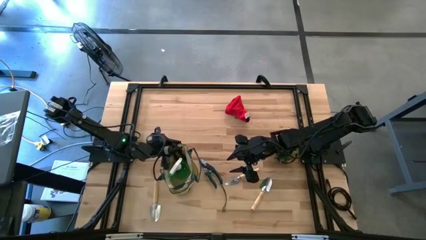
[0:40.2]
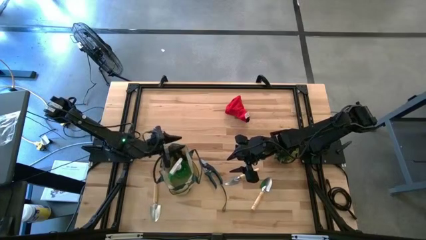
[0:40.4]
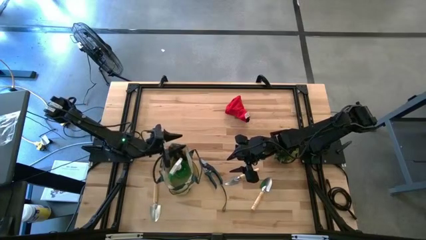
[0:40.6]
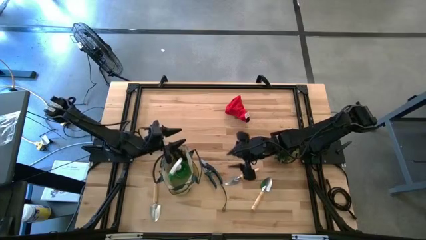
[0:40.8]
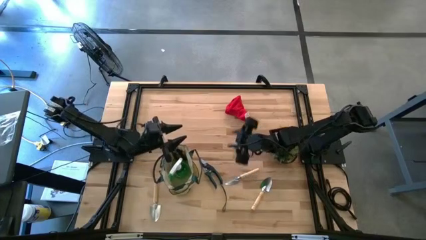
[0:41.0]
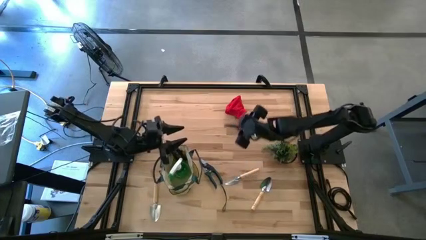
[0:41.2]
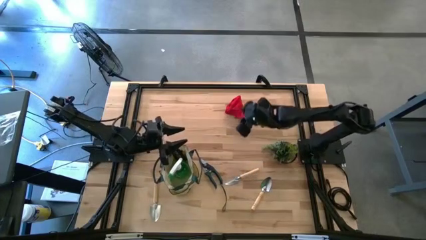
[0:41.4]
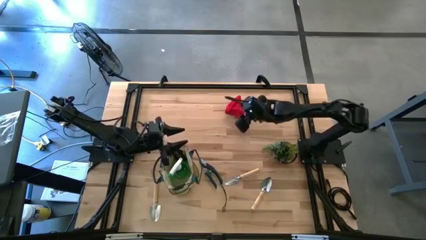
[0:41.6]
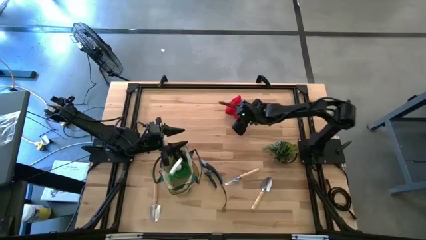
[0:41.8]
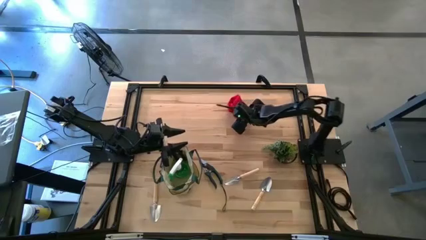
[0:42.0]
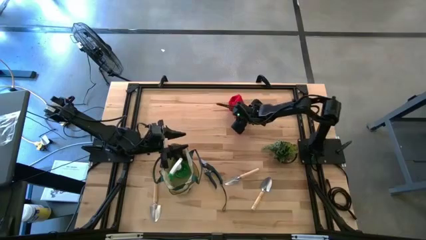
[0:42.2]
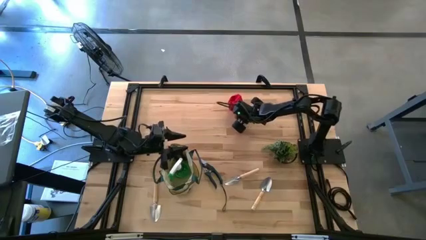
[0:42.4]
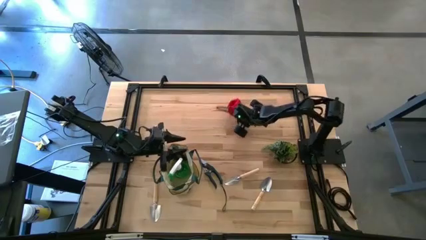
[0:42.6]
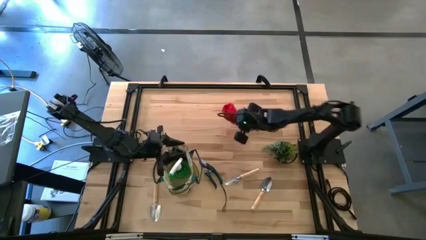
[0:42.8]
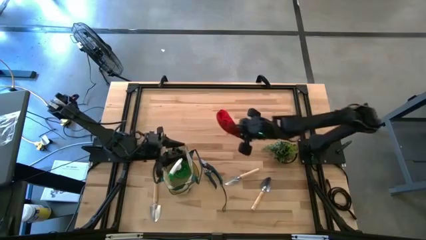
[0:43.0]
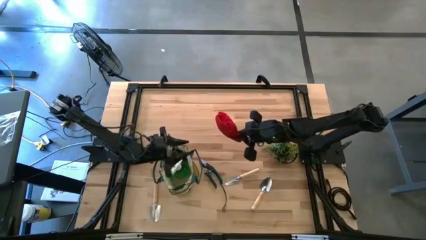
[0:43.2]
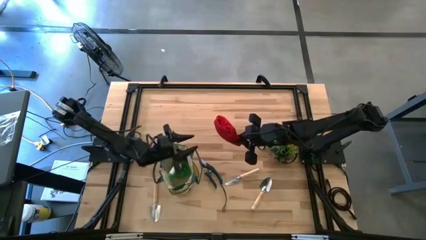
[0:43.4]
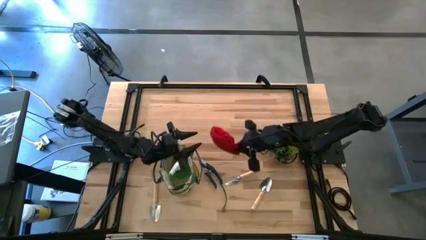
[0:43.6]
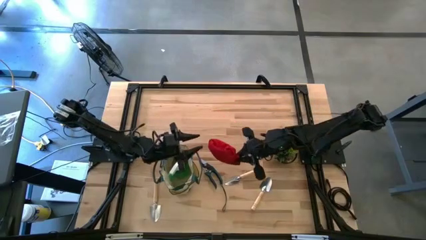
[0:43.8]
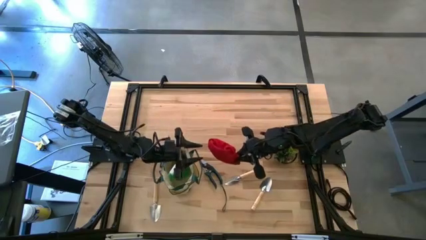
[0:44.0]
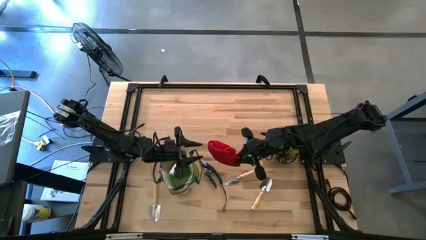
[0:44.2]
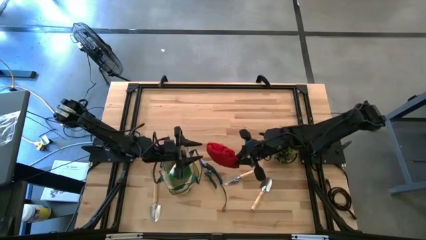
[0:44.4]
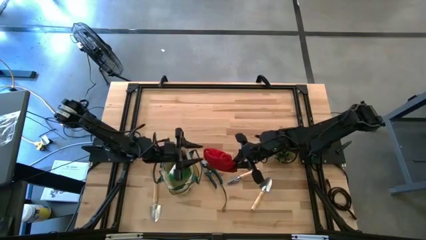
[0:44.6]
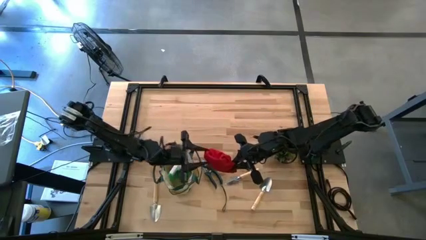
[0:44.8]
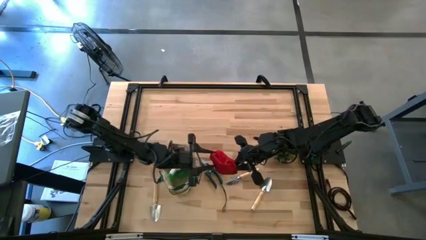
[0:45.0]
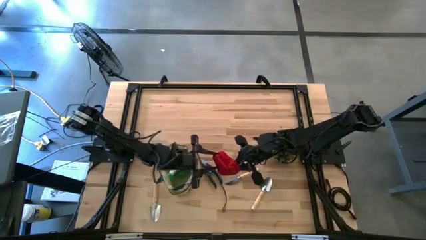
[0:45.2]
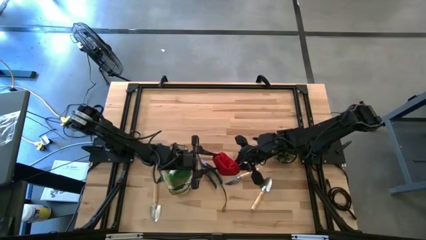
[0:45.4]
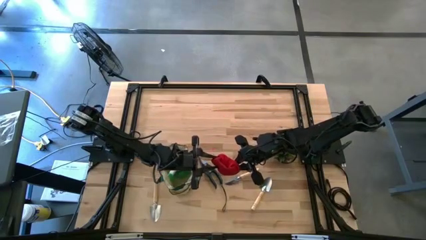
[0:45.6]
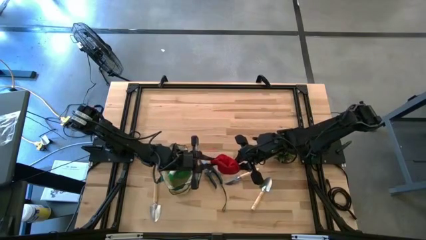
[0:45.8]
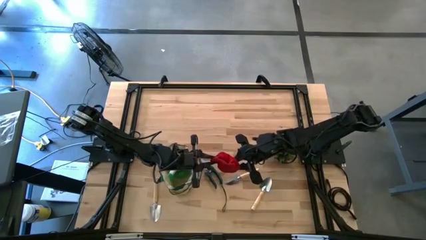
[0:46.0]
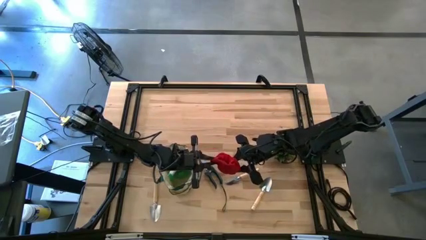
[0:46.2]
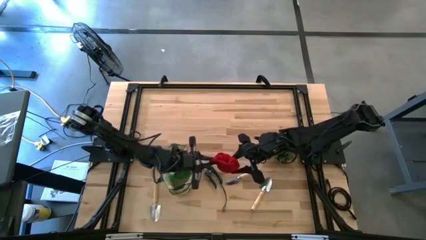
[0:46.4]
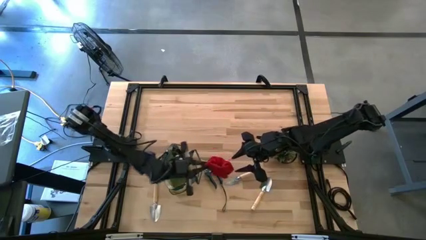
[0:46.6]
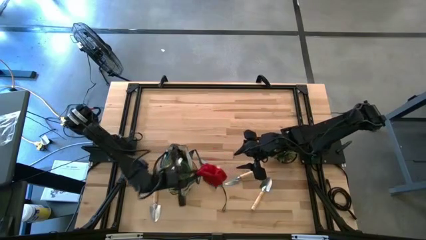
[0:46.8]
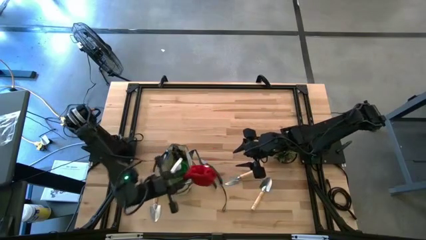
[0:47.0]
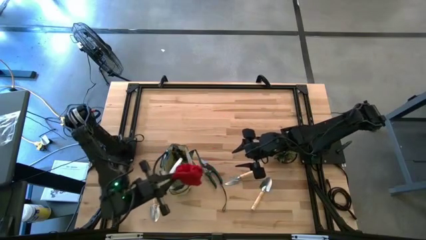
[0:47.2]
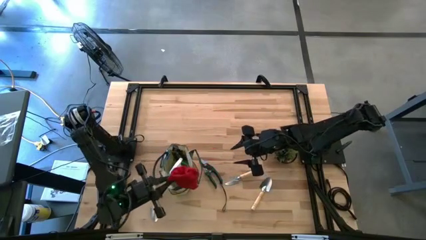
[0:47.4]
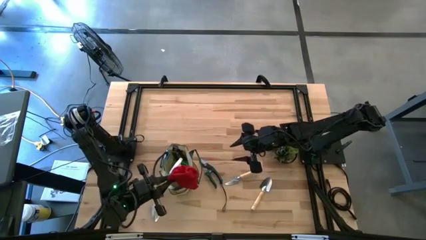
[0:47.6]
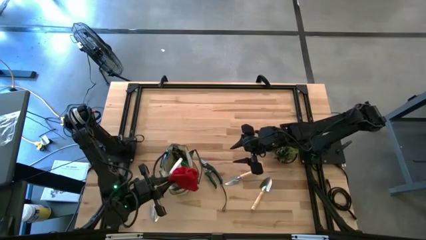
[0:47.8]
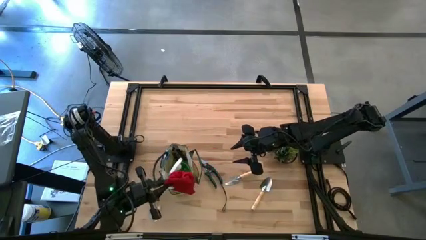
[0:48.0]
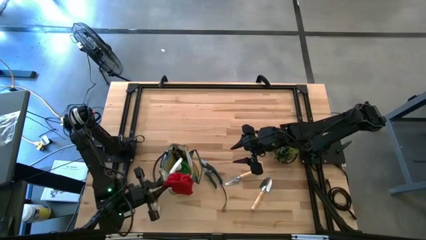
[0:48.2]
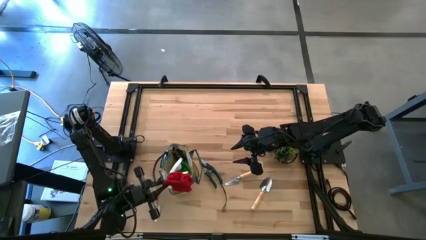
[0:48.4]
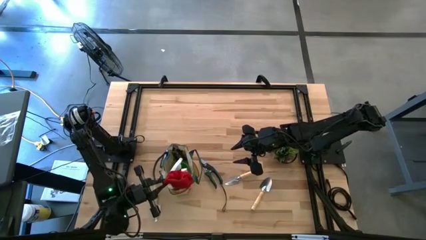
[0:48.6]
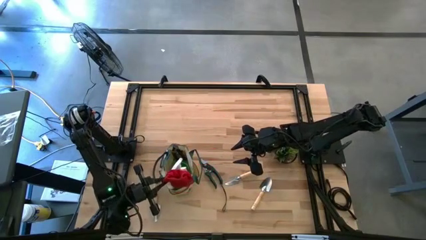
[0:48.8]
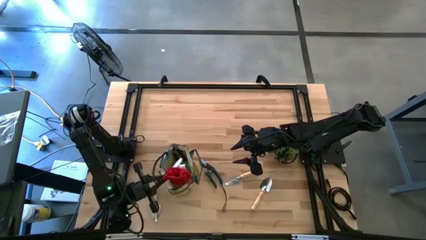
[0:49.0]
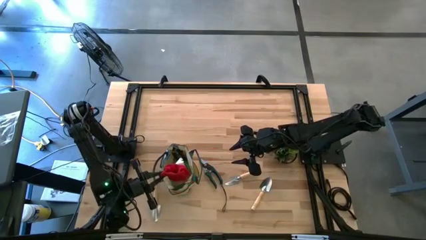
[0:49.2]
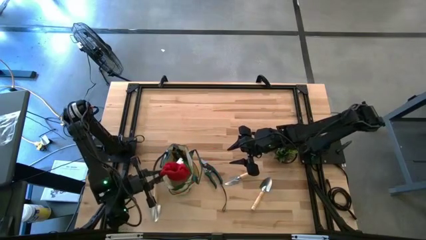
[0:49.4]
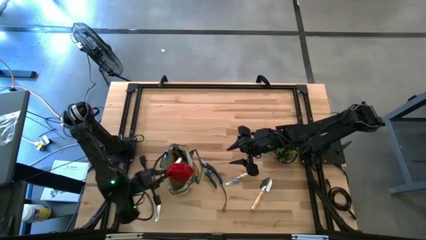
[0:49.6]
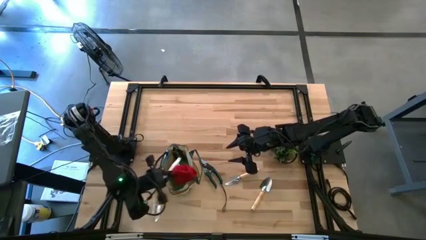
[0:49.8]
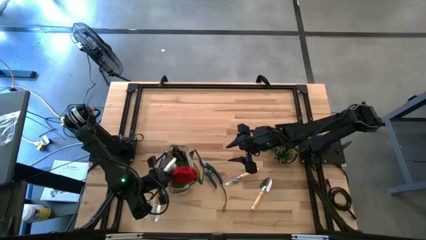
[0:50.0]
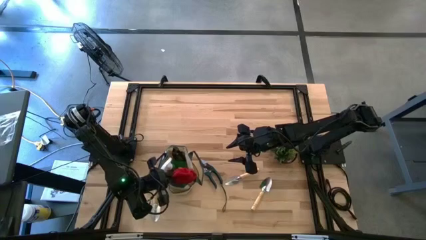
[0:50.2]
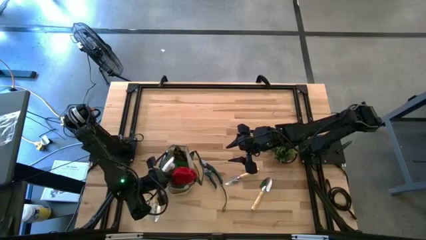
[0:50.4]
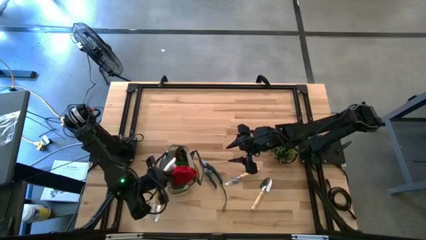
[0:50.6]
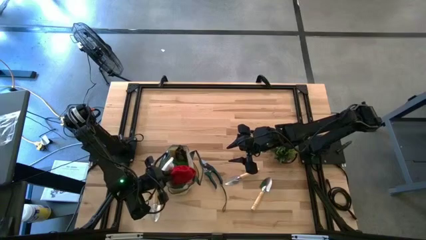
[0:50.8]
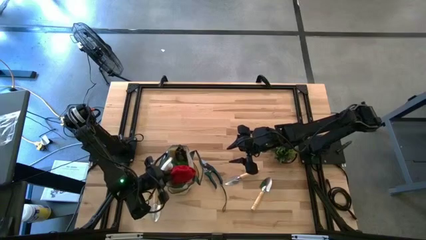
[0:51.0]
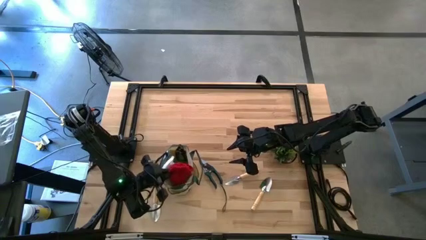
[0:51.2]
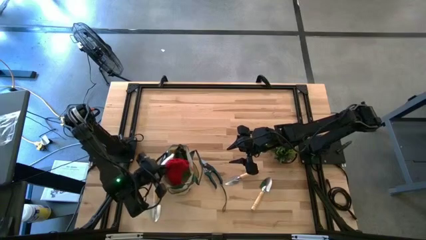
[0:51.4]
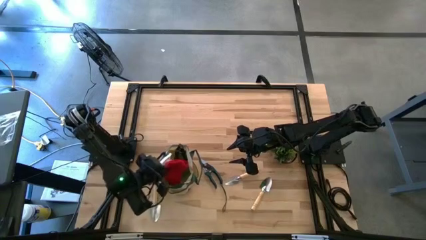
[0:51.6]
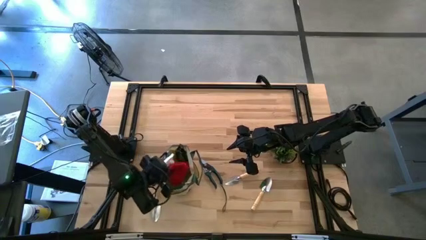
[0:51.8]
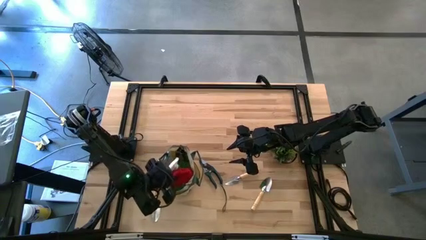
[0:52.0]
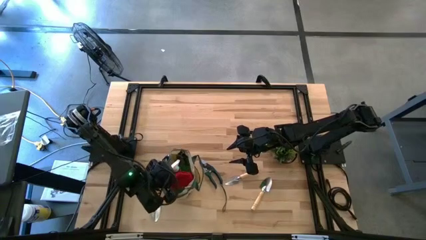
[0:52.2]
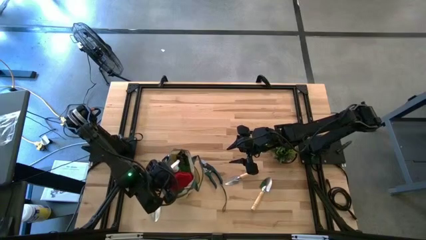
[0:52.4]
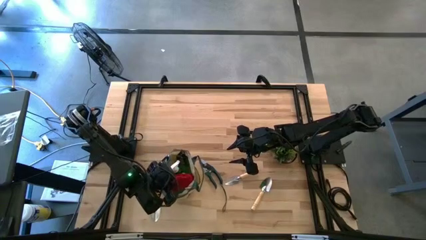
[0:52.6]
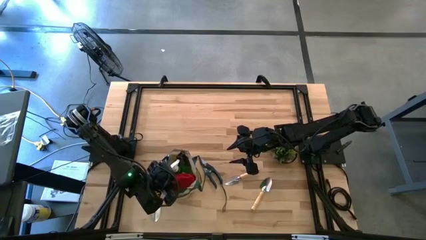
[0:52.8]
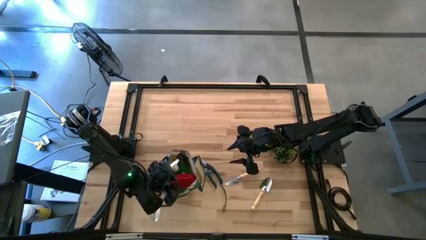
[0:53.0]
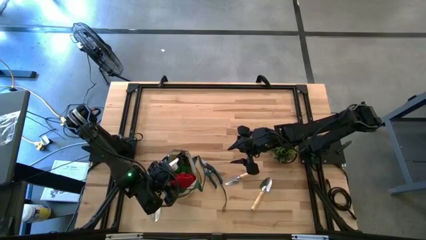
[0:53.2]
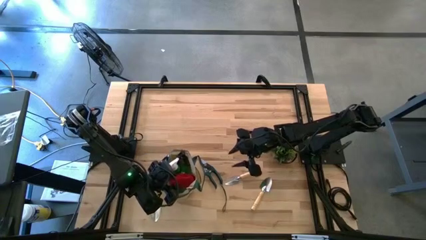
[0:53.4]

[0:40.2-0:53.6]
Task: Pick & Place Garden tools in Gardening bag
Put the red gloves into the brown gardening bag

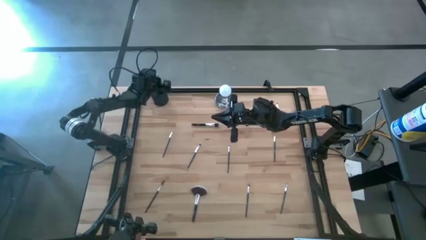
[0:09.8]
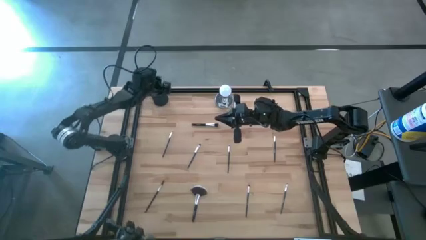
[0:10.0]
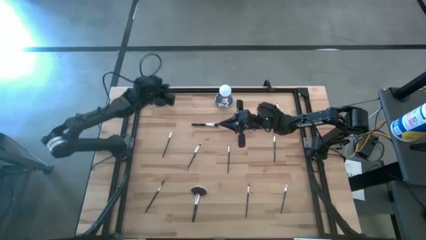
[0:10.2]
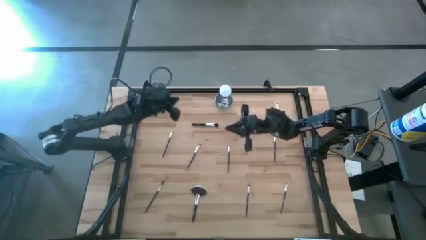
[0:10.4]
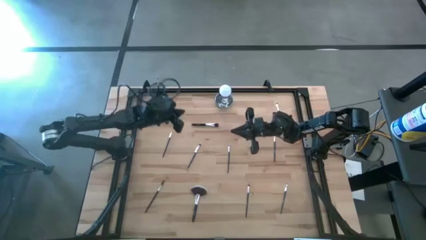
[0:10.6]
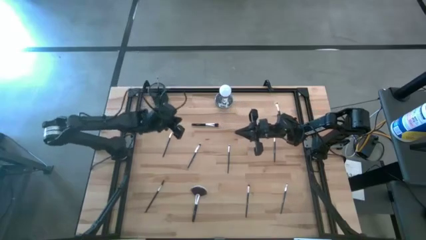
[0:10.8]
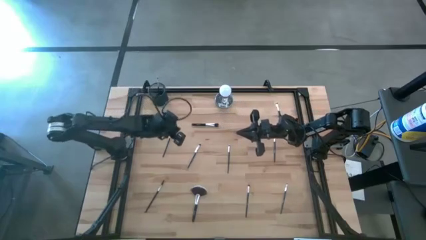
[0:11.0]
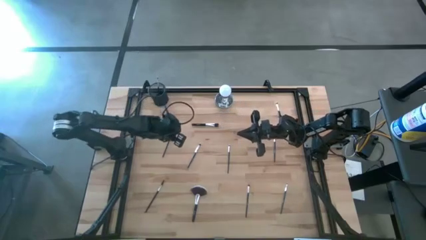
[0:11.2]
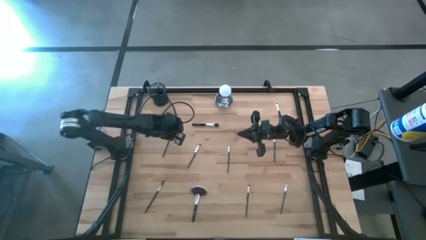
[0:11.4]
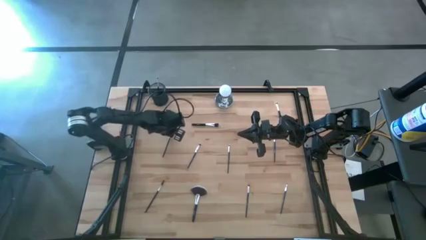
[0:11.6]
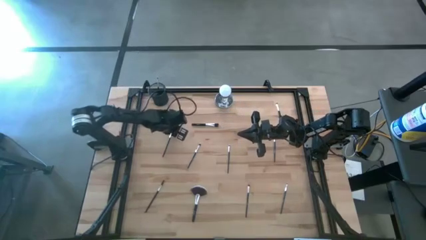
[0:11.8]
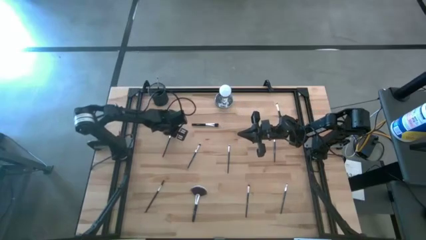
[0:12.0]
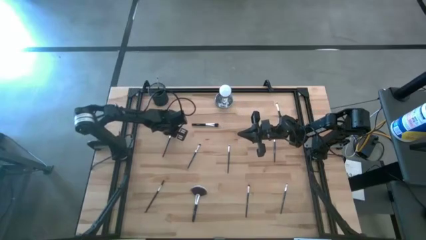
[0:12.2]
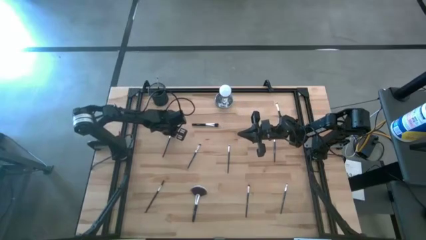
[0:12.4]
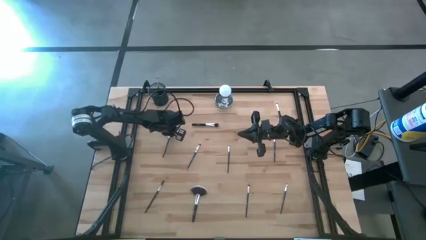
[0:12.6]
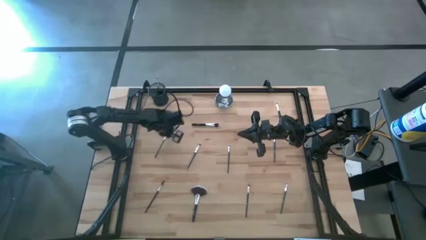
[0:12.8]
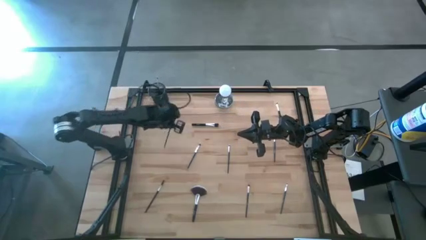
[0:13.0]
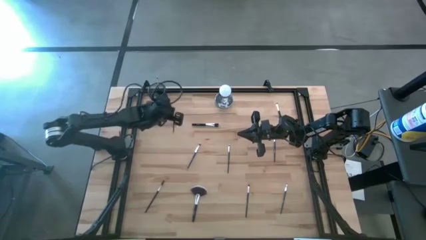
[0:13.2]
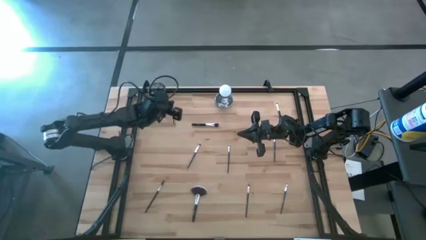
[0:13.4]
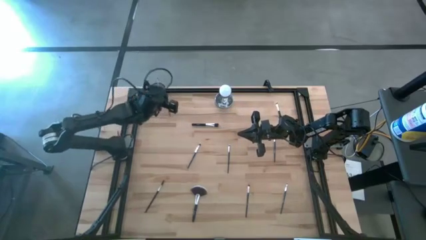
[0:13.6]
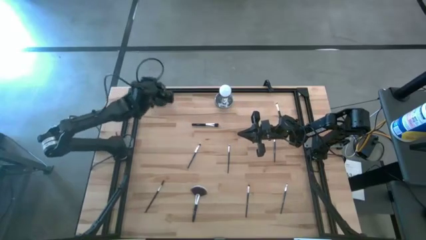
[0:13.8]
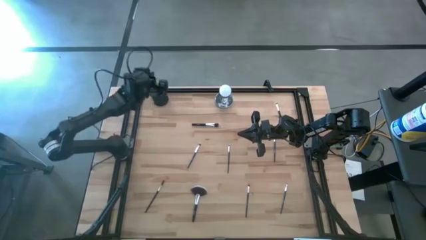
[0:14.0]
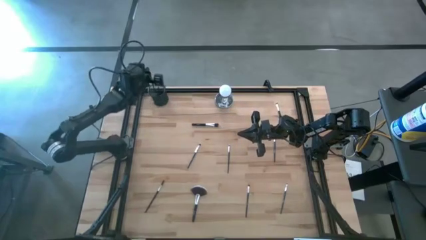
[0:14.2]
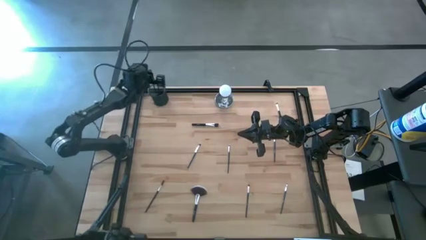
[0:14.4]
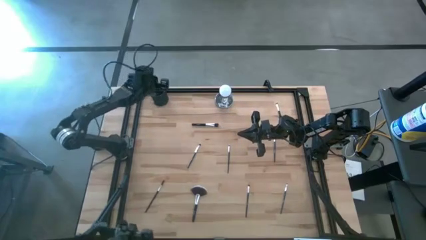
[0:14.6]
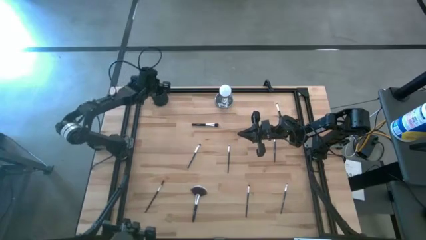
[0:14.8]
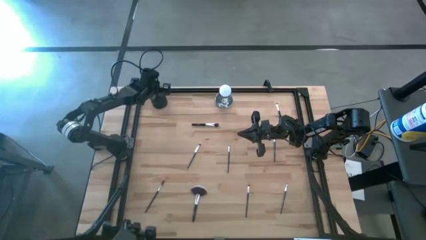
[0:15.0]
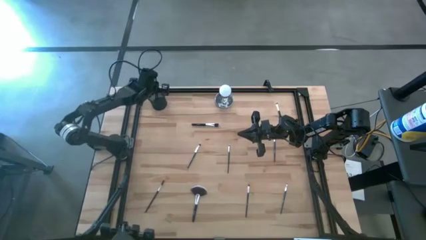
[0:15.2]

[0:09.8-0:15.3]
Task: Put items in baskets/containers
Put the black eyeliner brush into the black brush holder
